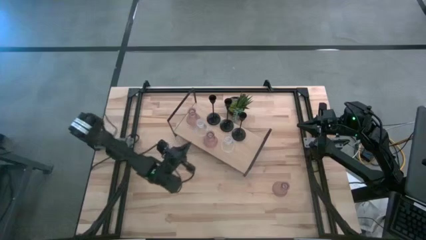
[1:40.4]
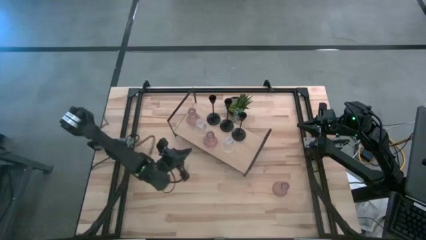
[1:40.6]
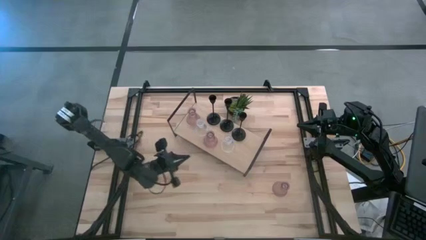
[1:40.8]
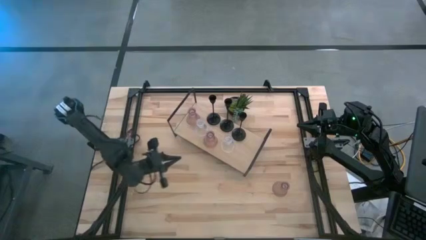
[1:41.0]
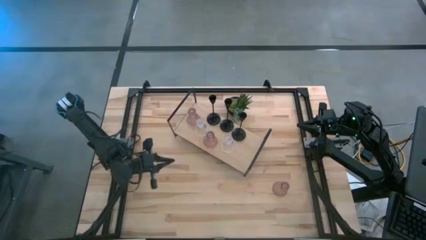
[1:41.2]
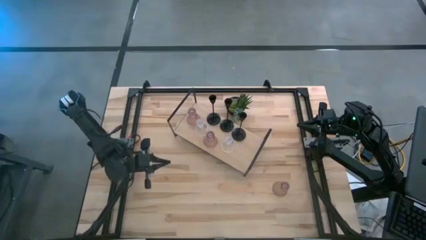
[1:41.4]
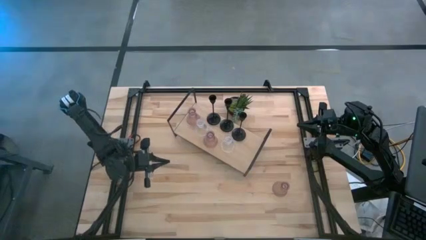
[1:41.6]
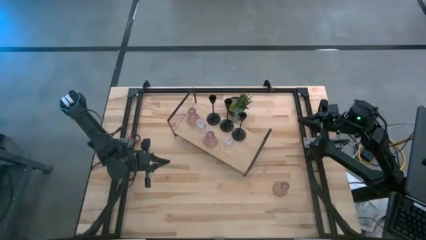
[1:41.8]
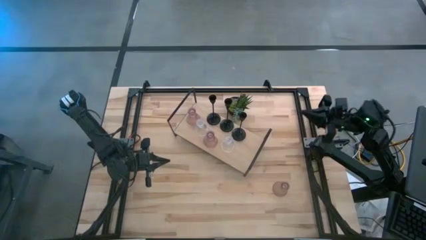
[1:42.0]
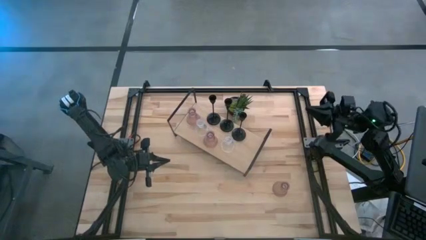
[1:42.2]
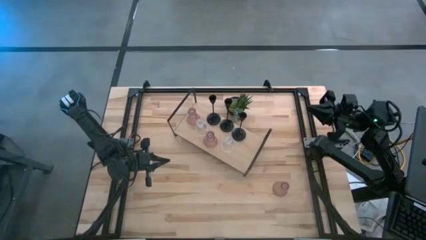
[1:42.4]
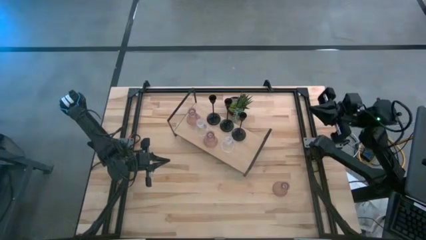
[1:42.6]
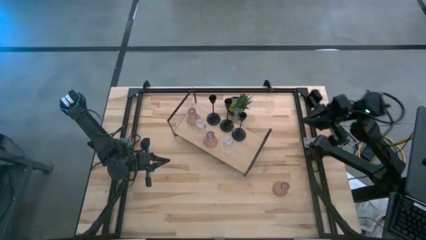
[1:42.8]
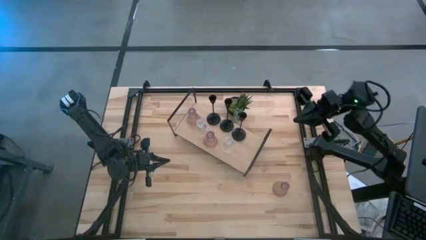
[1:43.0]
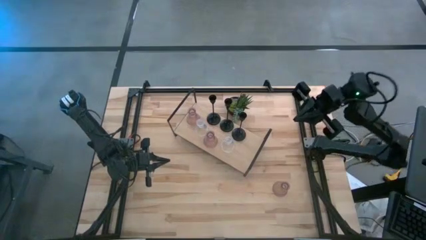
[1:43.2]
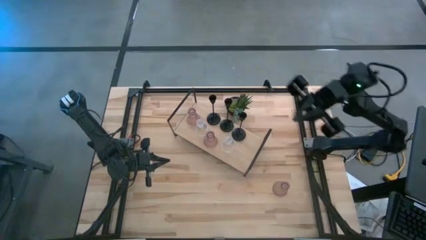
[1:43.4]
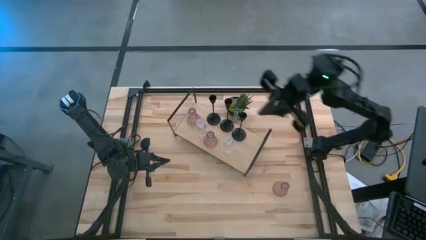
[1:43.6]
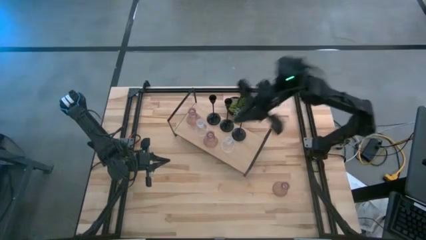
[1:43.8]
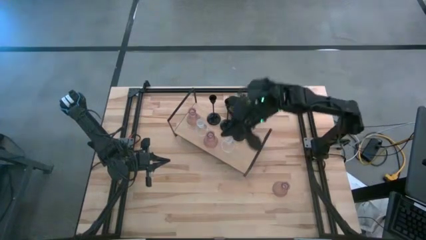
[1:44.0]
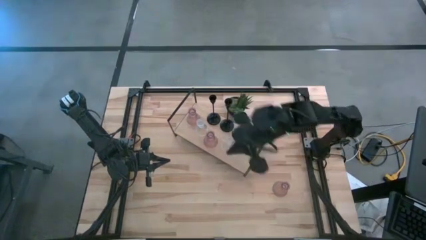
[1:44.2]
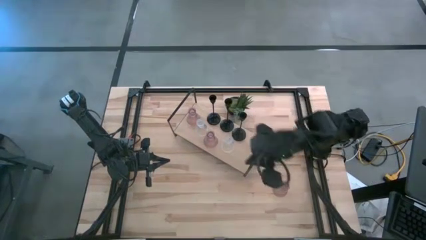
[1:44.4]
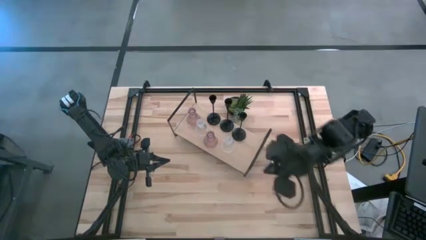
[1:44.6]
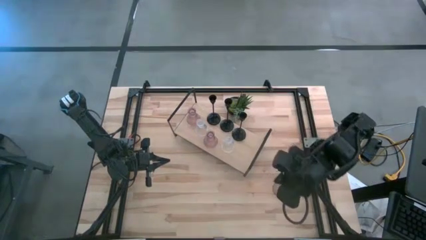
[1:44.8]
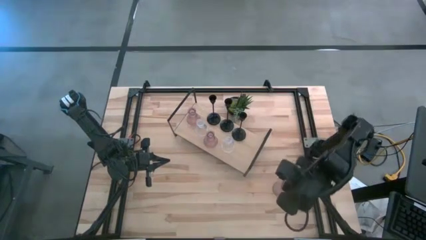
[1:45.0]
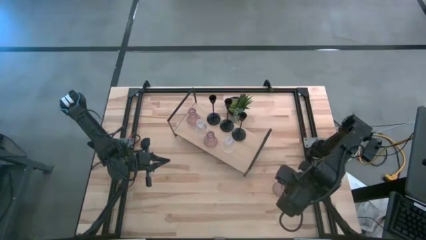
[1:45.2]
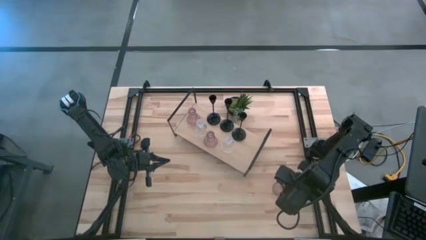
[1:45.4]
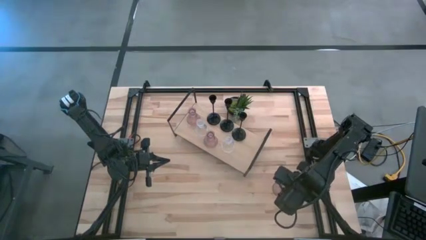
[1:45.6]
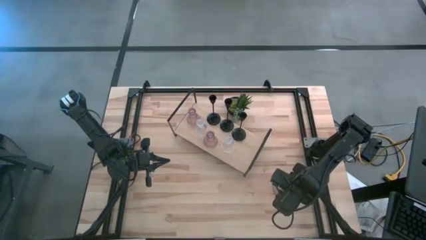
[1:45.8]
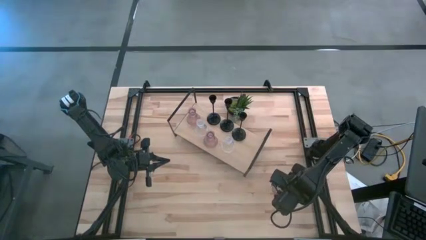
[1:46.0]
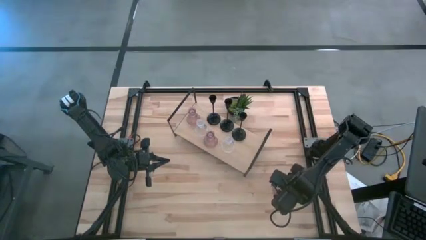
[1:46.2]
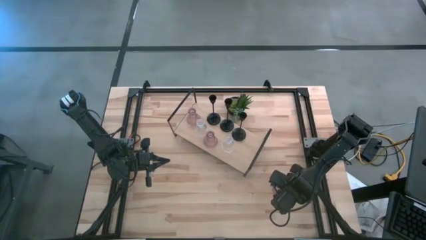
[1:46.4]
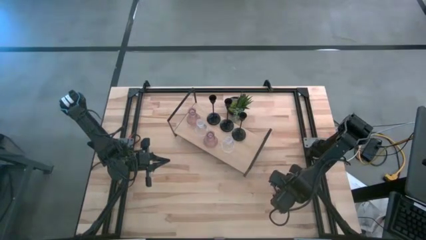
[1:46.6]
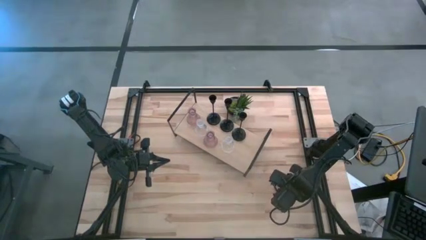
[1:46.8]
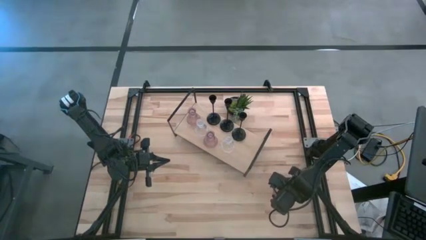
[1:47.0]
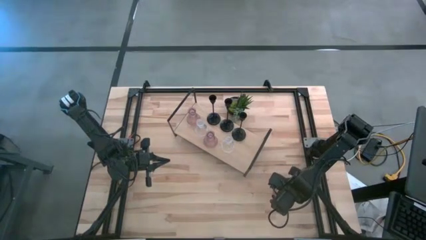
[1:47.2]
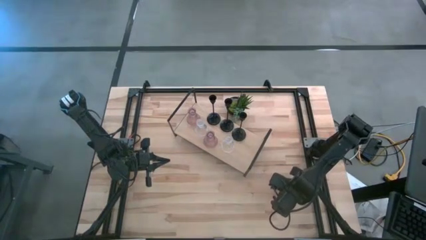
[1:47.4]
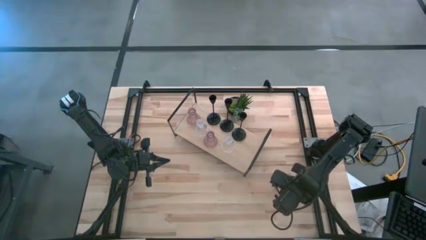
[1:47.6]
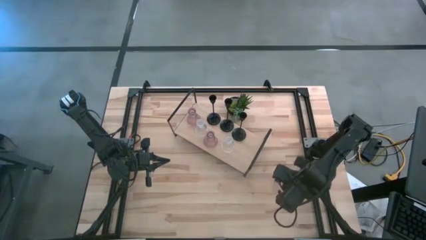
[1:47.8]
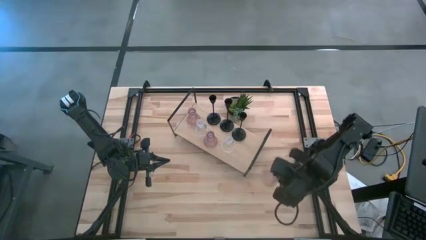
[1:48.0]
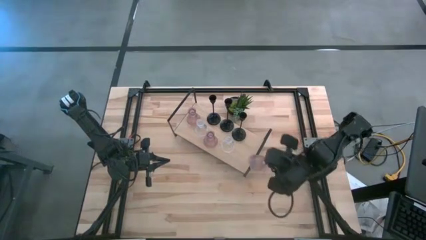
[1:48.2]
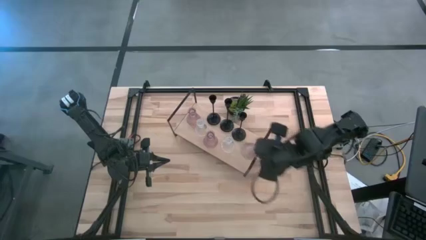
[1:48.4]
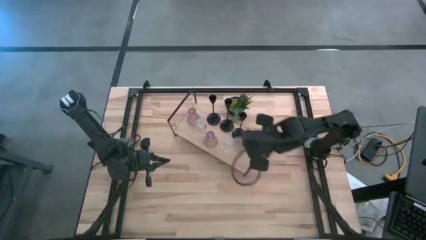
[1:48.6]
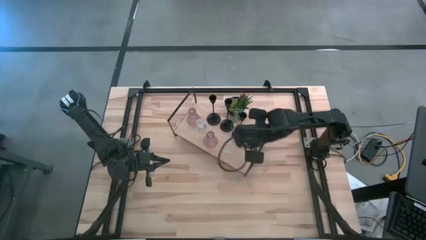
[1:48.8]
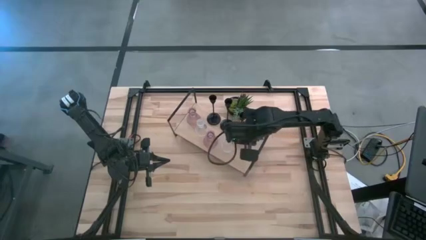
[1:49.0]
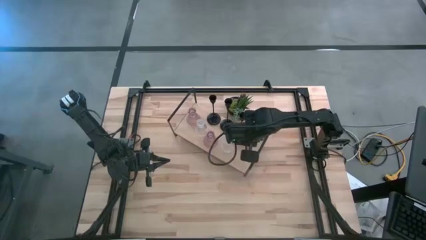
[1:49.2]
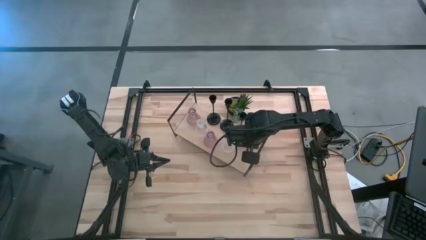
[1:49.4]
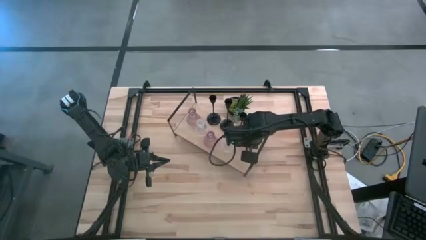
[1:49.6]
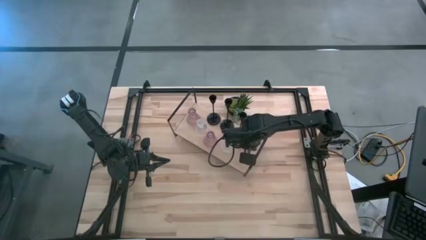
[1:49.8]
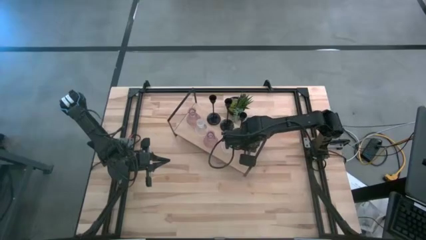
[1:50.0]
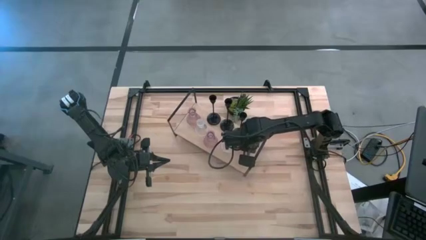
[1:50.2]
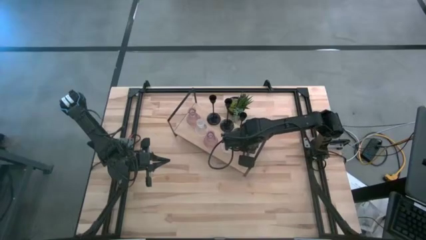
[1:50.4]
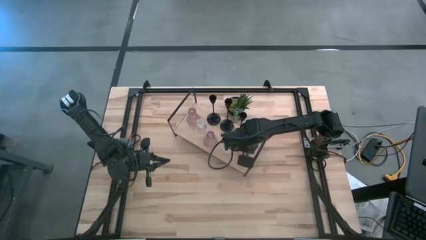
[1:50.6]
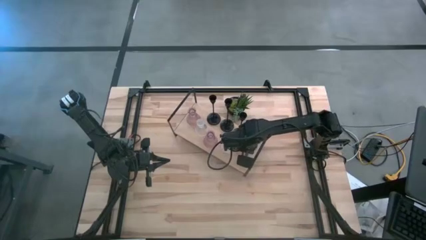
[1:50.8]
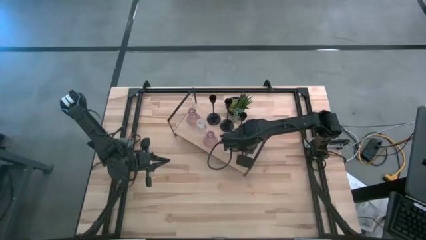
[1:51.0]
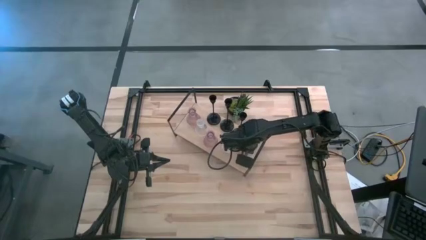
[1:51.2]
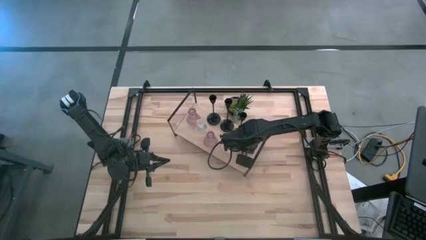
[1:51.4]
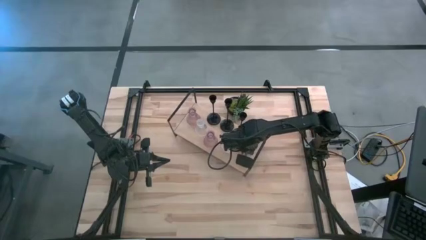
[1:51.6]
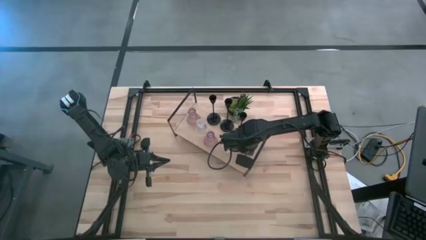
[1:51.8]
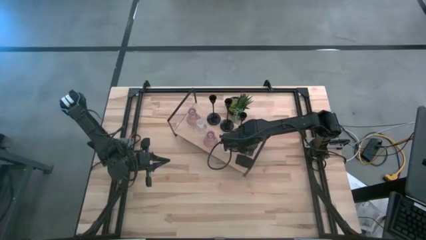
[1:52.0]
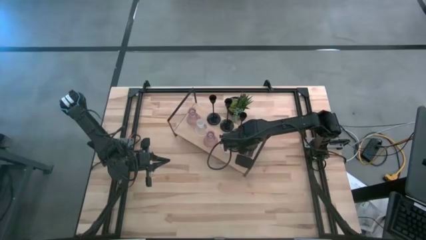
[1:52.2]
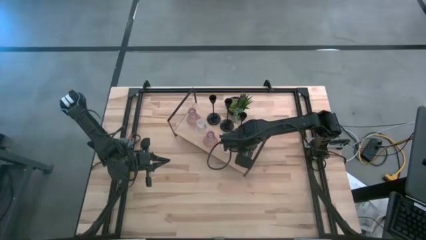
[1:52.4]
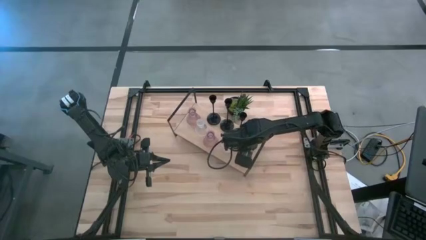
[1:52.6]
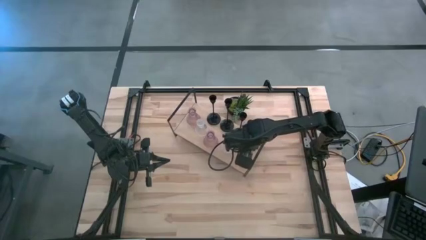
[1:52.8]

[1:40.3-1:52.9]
Task: Pick & Place candle stick holders
Put the pink glass candle holder on the shelf

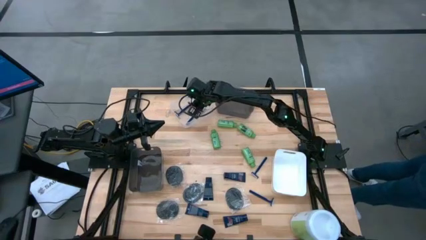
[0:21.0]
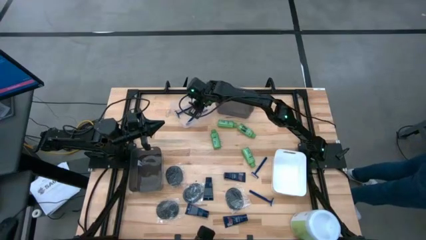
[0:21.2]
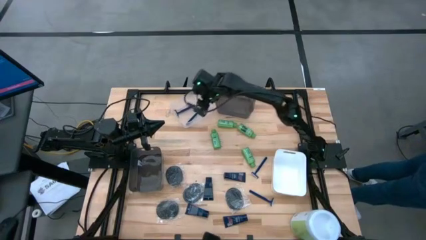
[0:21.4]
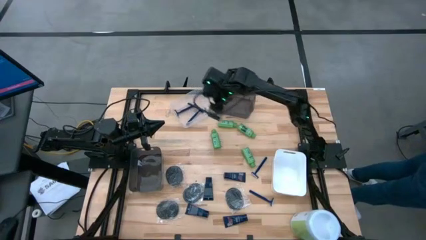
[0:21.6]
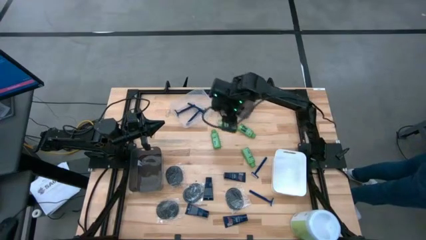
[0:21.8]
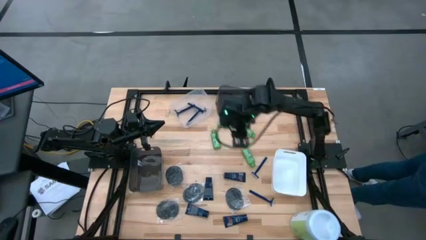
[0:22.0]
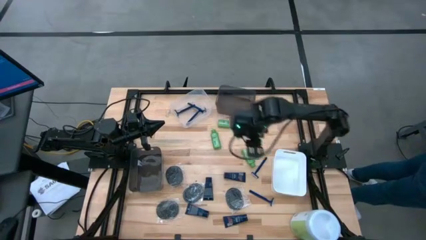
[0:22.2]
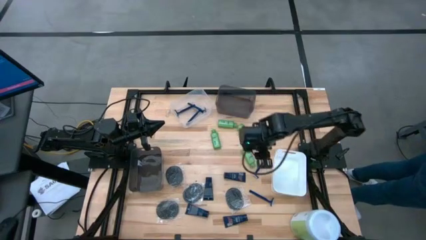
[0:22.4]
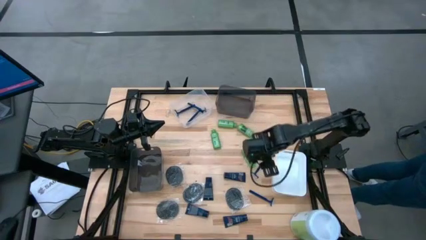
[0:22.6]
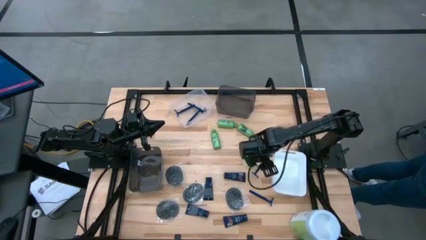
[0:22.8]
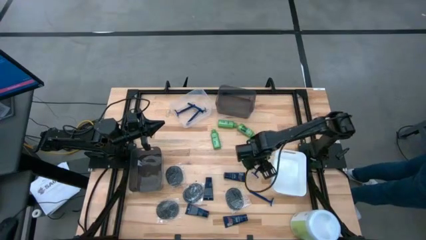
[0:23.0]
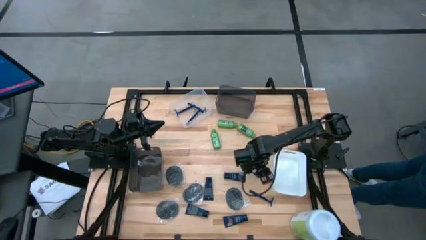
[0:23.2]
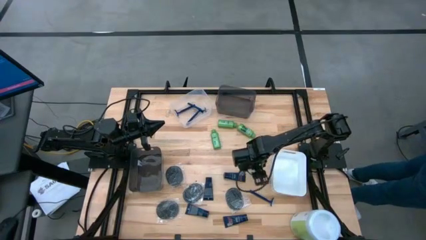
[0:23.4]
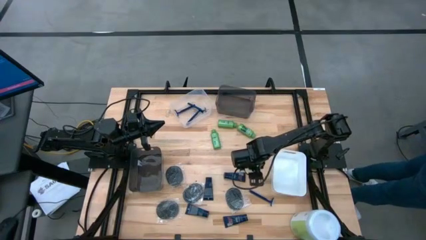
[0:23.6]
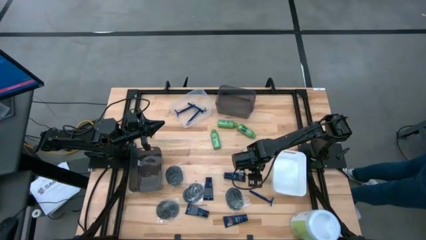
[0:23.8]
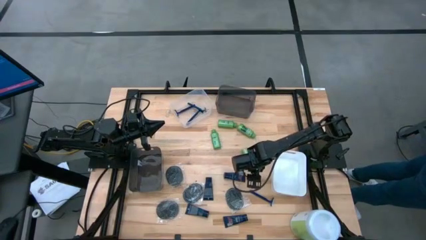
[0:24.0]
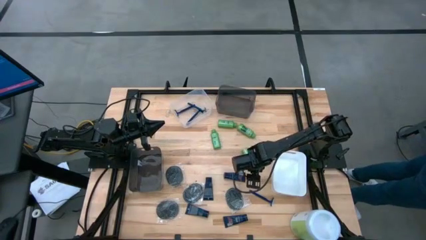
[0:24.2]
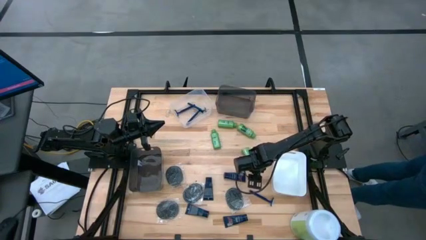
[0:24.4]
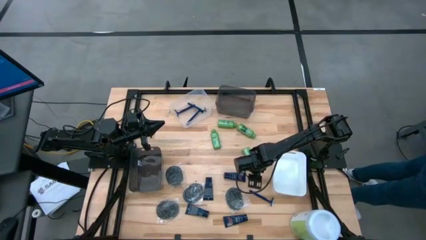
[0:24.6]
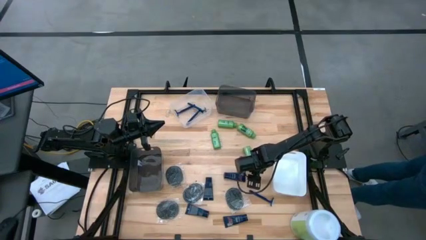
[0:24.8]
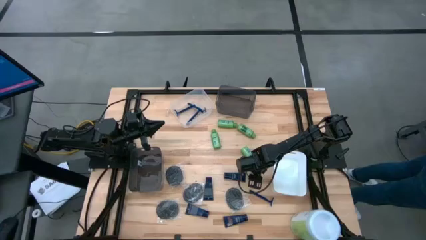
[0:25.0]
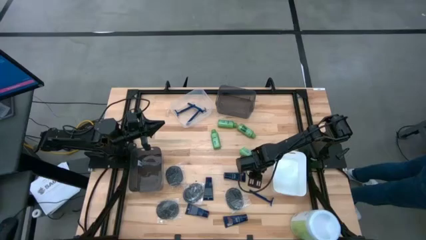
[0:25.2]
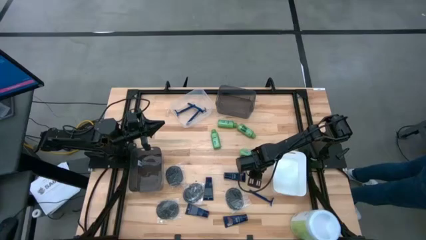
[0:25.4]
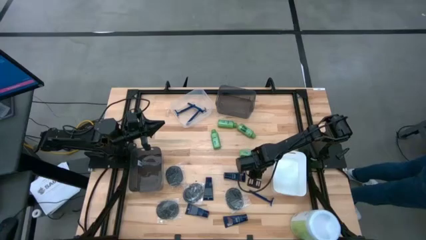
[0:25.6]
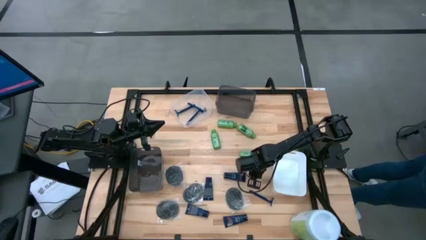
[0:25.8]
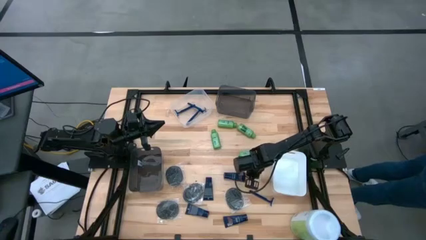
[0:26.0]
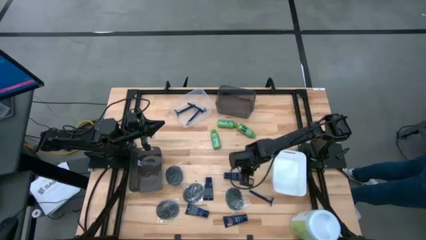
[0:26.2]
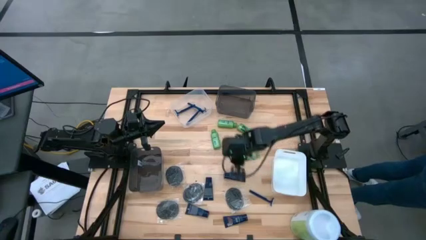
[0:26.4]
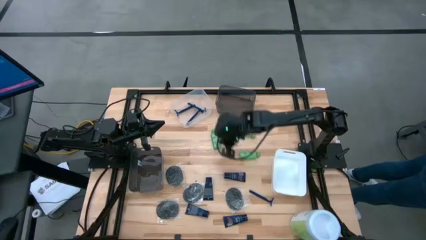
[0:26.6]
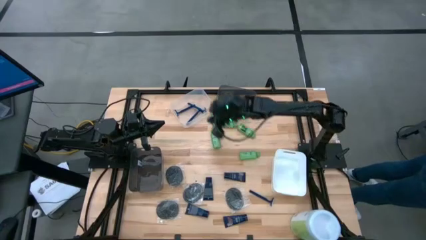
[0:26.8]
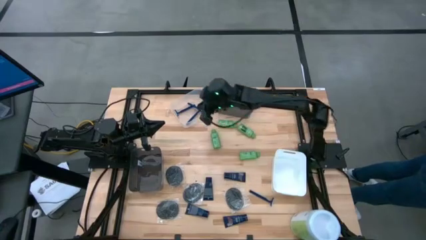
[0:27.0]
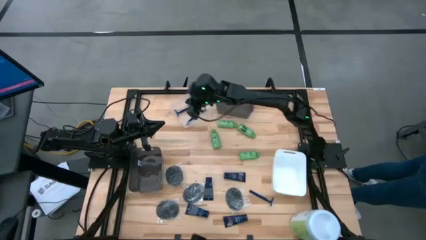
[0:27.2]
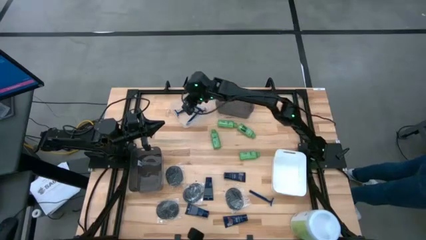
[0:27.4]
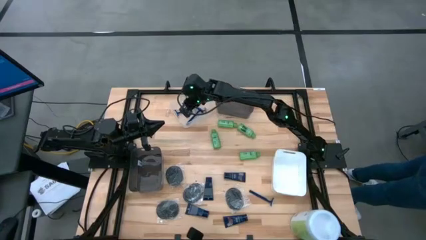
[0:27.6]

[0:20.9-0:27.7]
Task: Pick & Place Travel size toiletries
Put the blue razor into the white transparent bin
